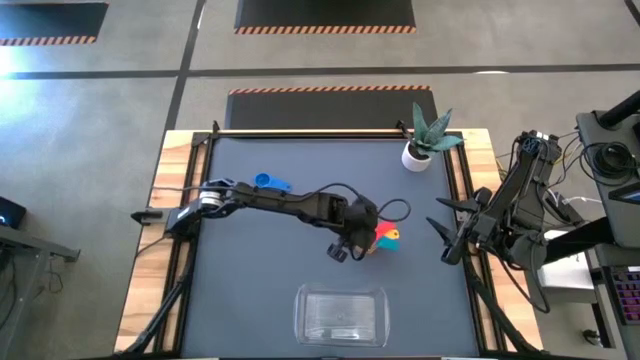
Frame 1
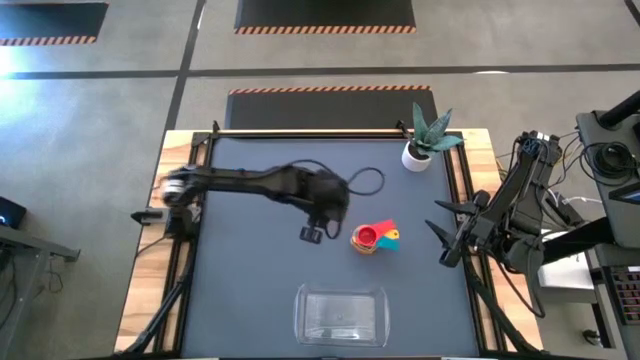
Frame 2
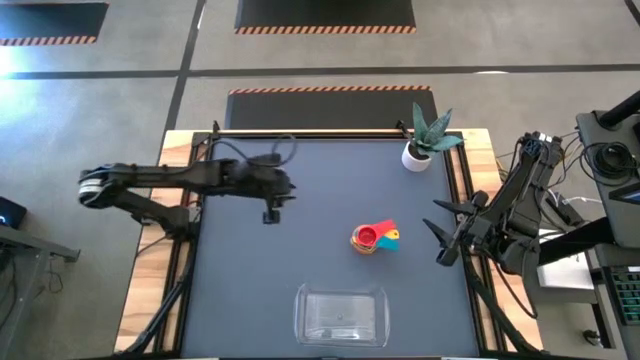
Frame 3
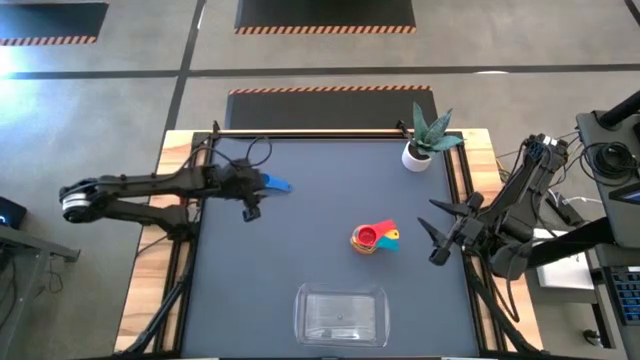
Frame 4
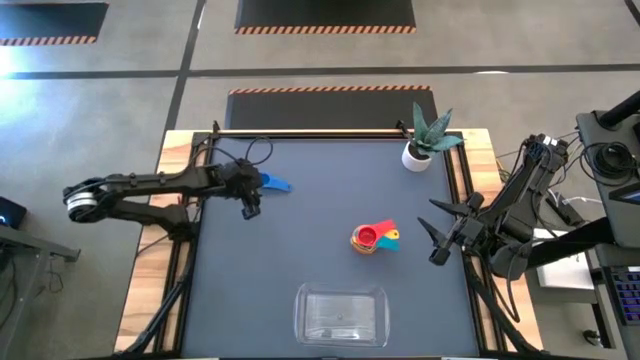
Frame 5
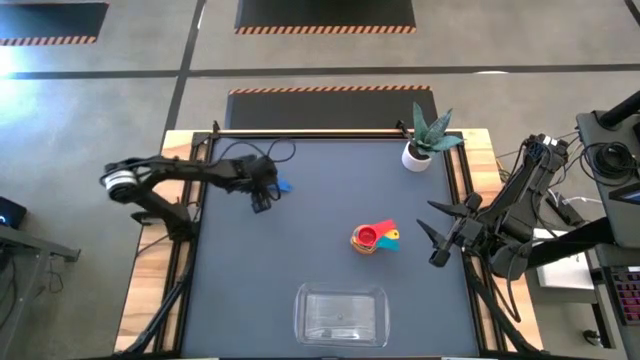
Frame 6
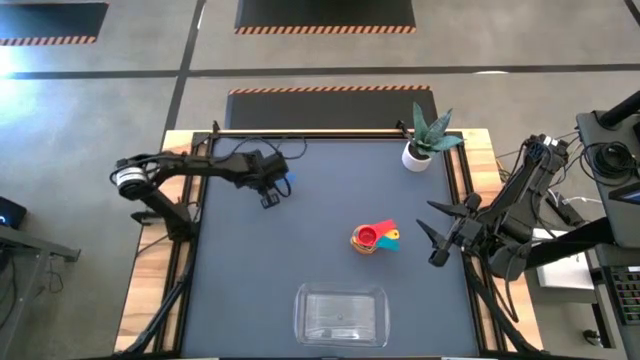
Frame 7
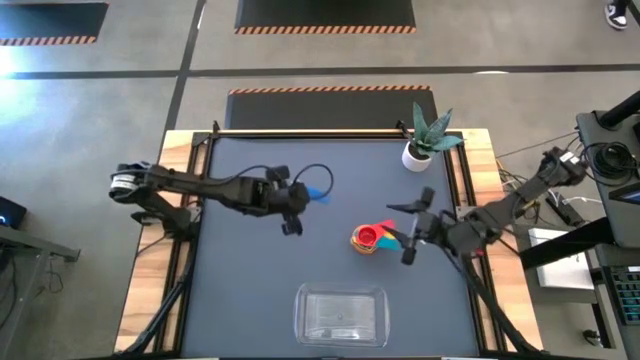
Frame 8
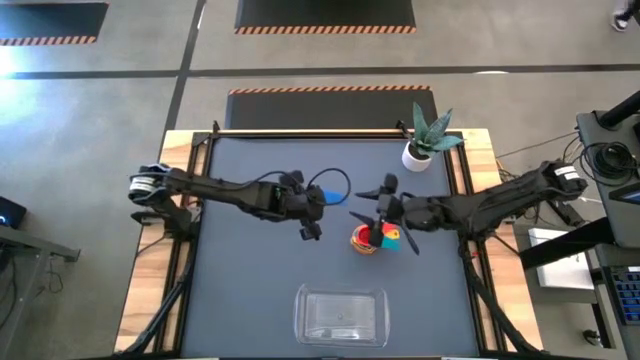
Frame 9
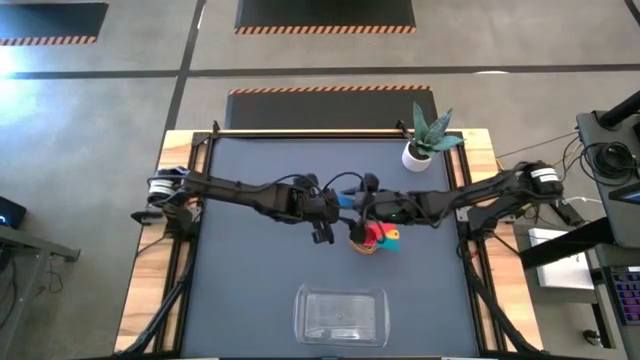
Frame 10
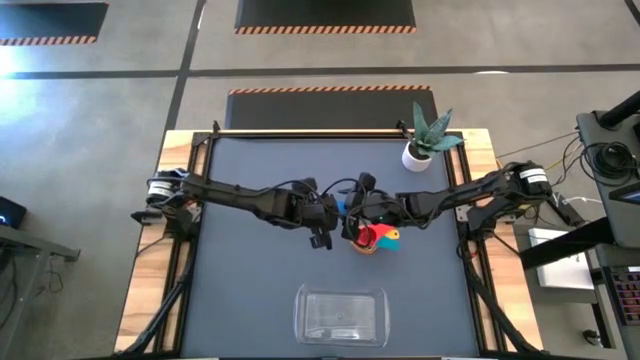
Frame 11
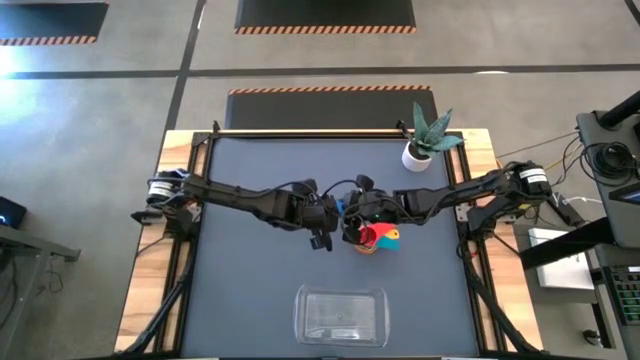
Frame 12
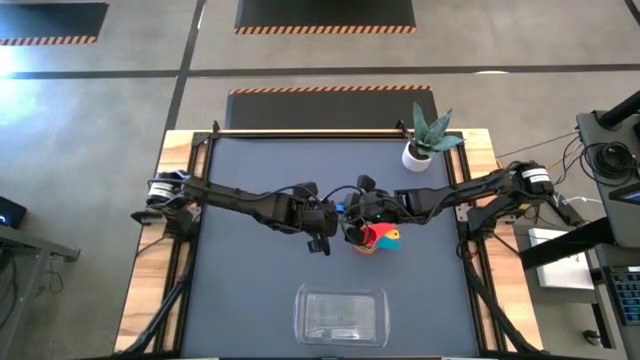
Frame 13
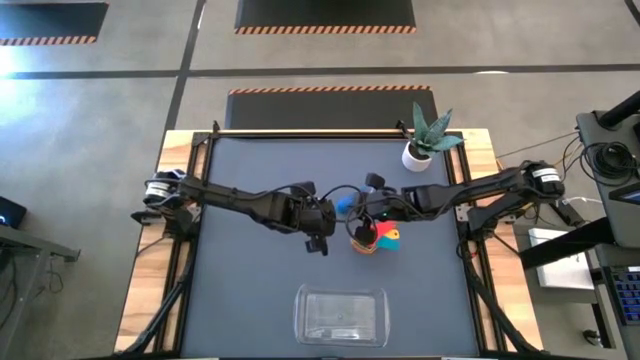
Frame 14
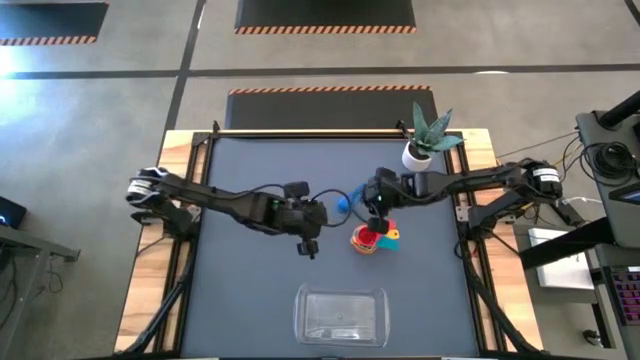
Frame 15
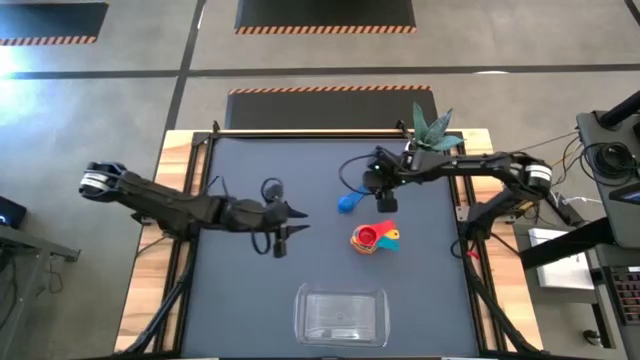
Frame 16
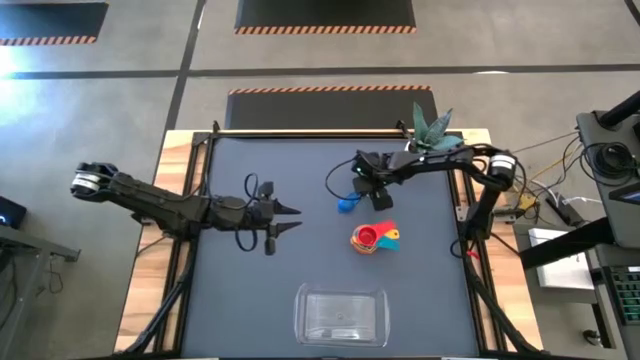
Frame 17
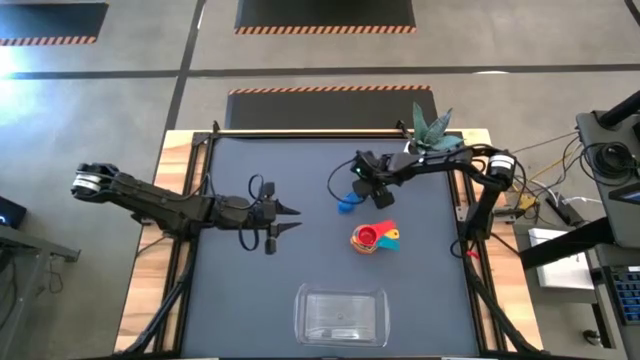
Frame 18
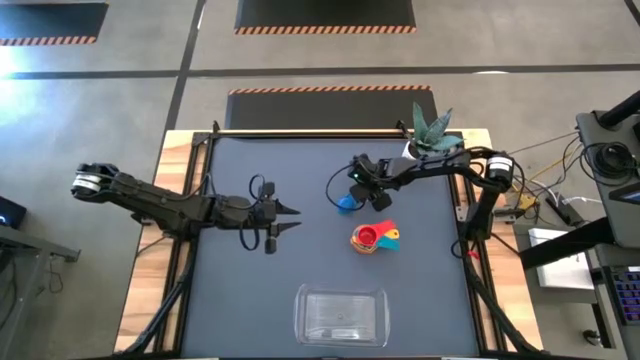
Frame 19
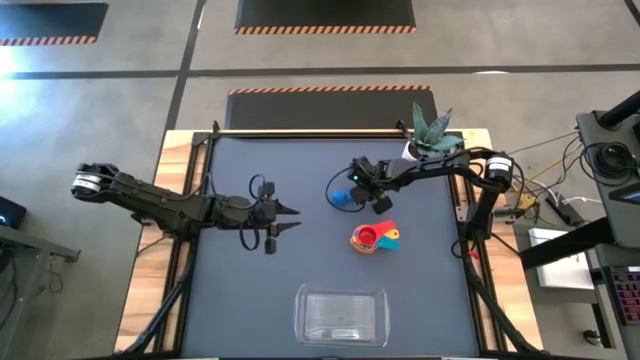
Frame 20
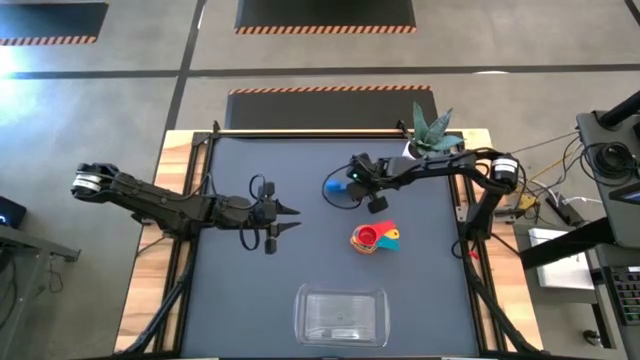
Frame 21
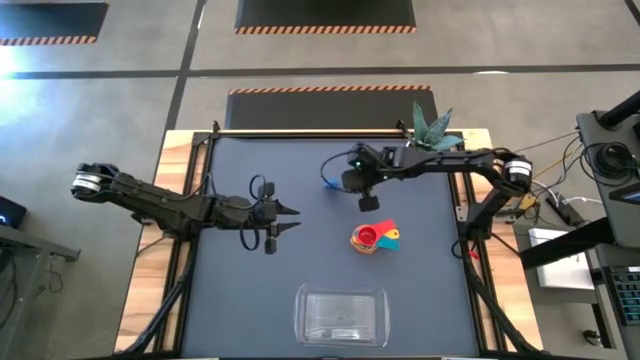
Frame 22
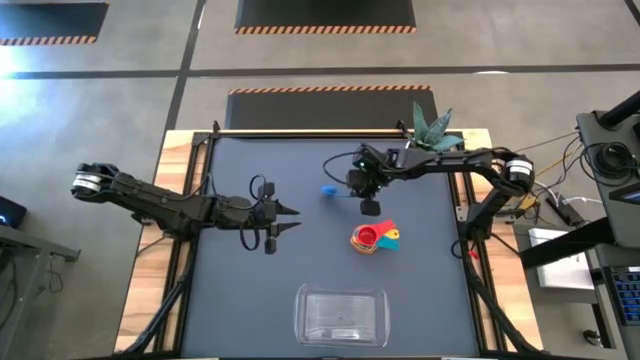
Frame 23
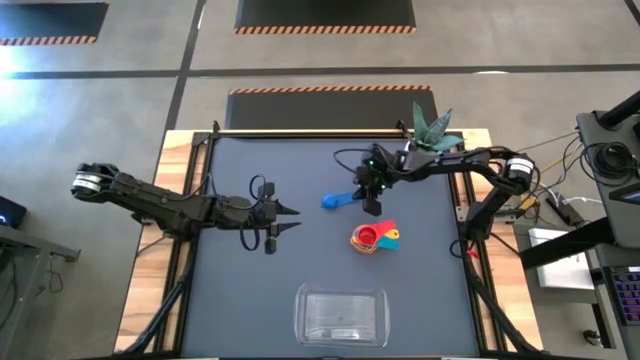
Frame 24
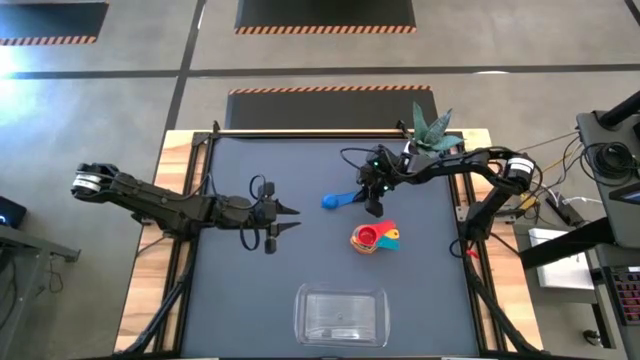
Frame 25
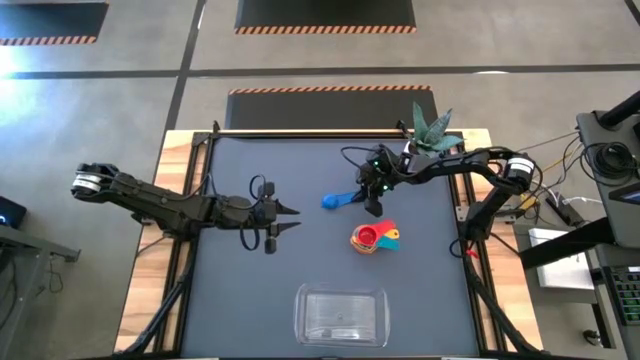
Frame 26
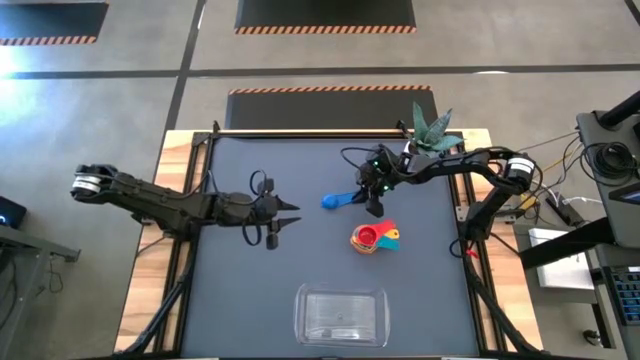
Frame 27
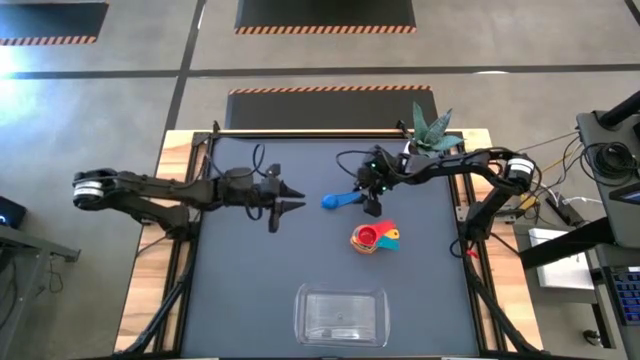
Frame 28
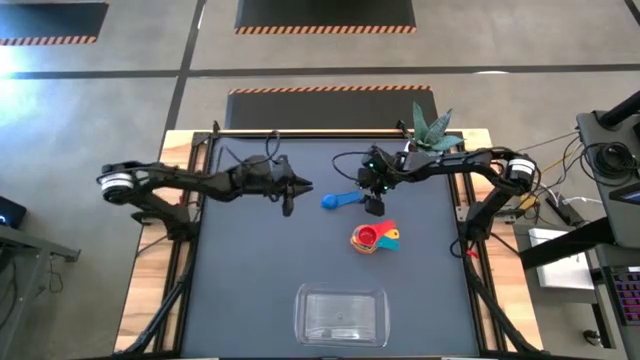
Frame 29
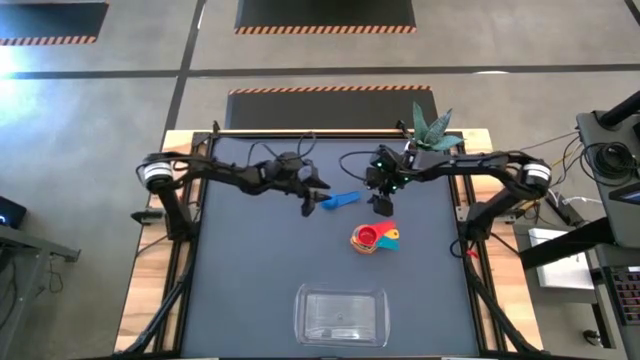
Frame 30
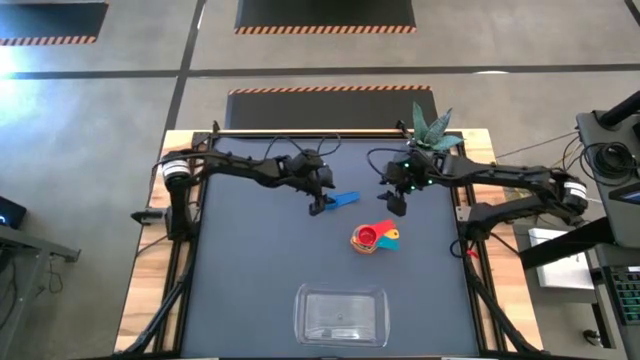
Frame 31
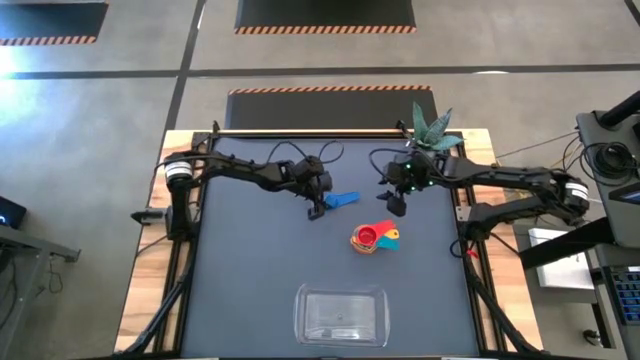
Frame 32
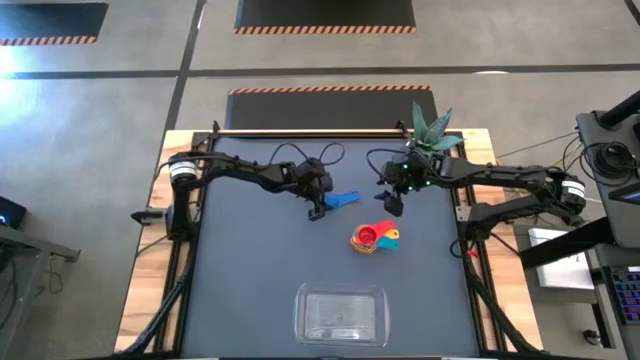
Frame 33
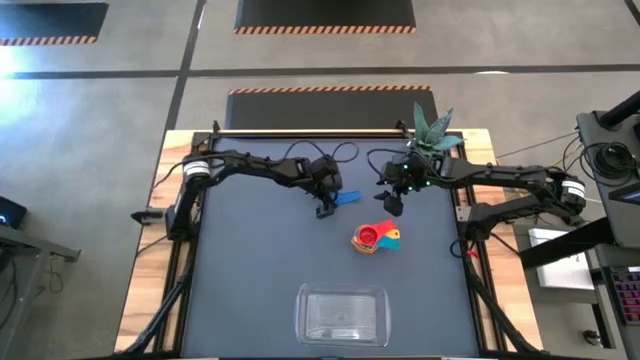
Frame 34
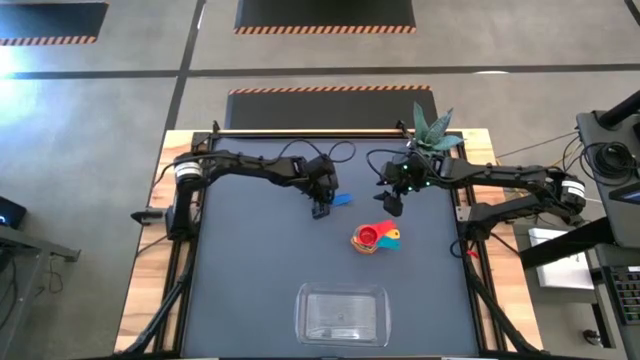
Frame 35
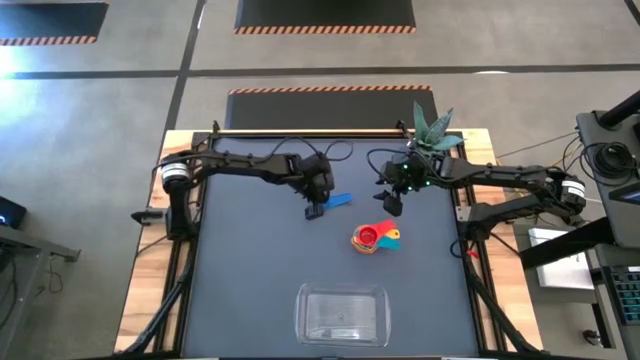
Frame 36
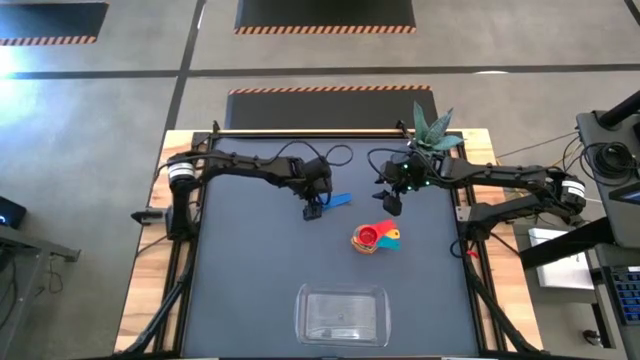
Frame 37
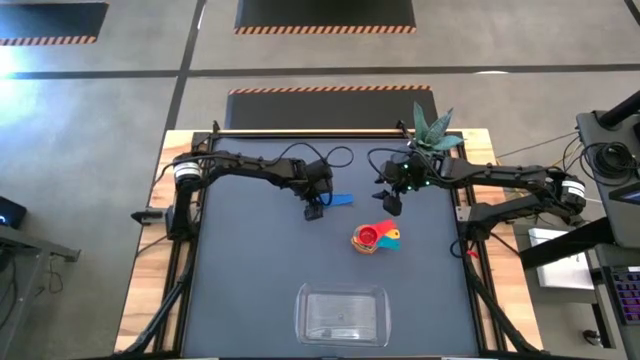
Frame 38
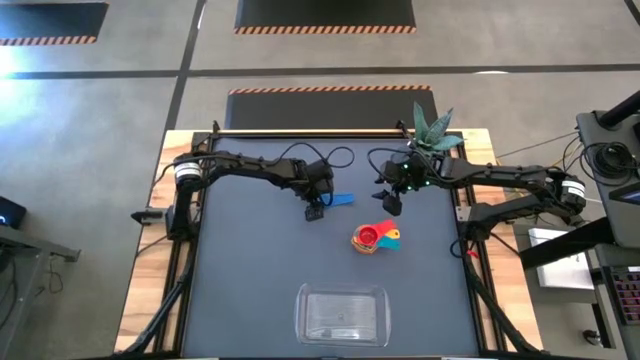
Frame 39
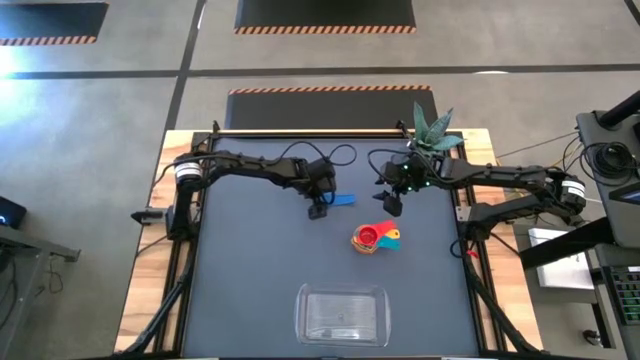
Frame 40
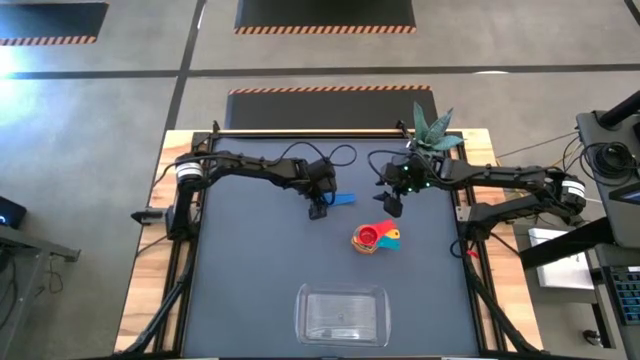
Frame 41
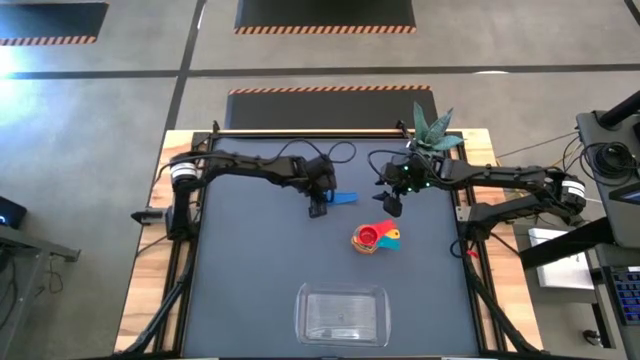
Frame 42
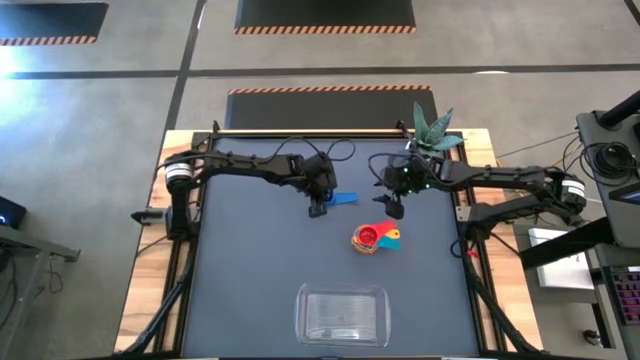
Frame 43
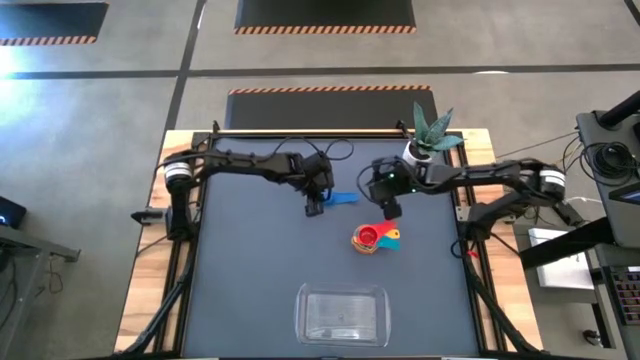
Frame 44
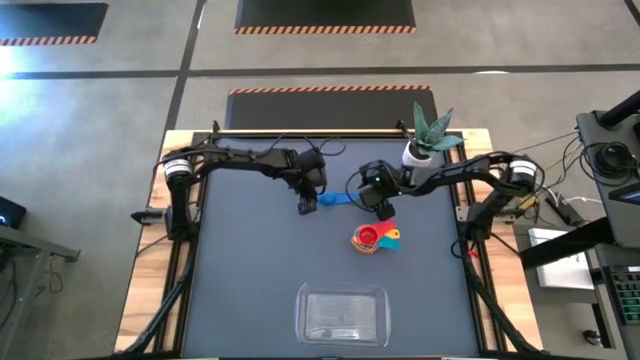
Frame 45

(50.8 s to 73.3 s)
Task: Nest measuring cups in basket
Stack the red measuring cup into the light blue measuring cup
